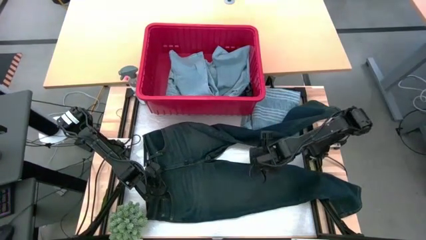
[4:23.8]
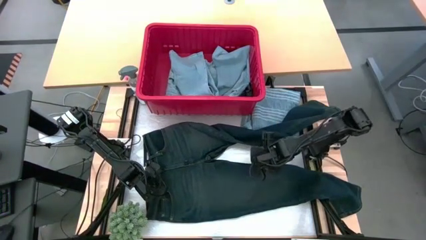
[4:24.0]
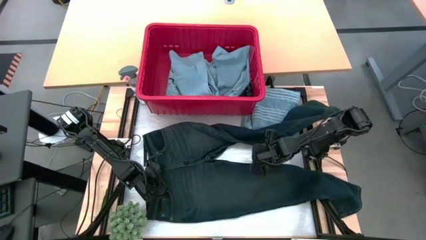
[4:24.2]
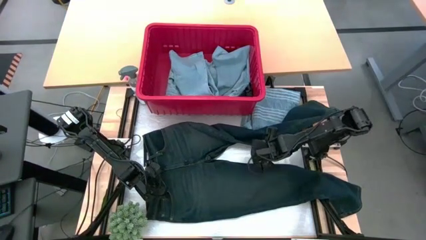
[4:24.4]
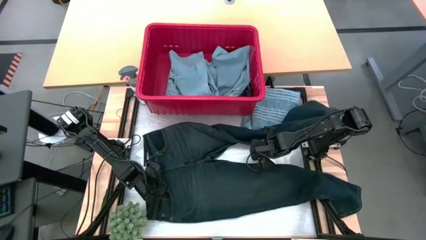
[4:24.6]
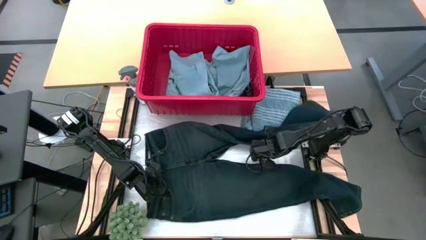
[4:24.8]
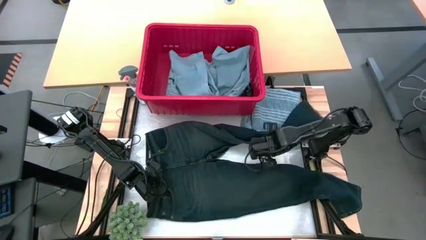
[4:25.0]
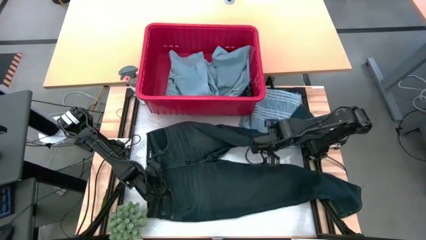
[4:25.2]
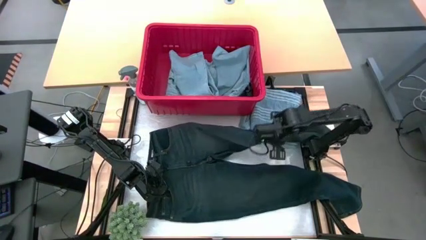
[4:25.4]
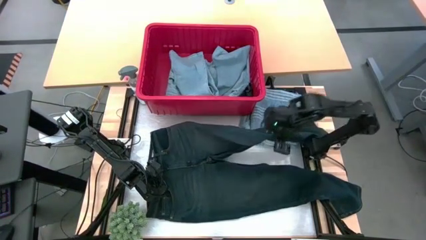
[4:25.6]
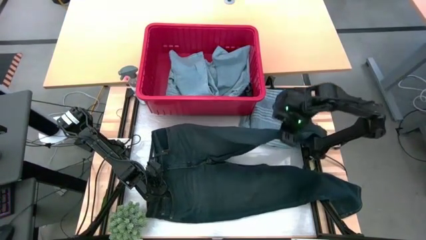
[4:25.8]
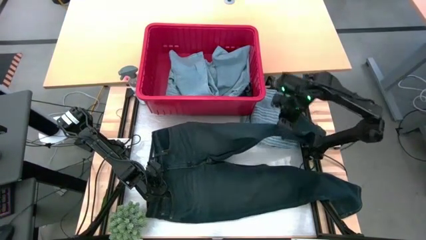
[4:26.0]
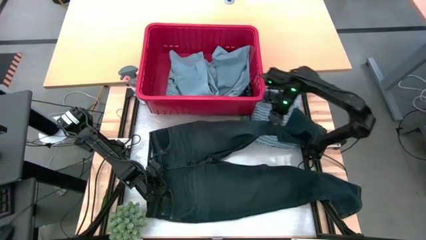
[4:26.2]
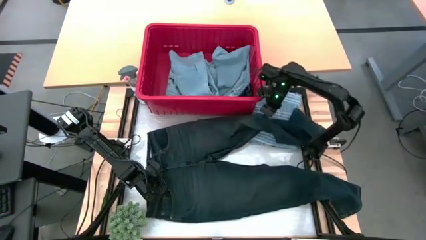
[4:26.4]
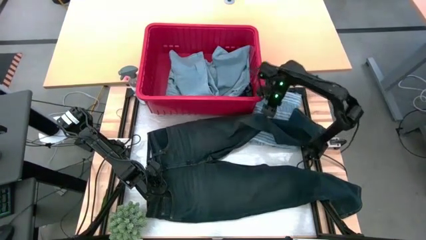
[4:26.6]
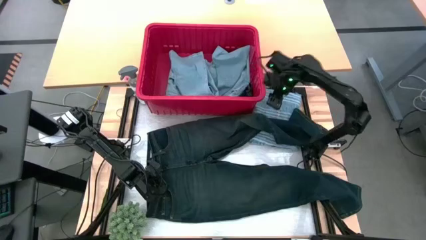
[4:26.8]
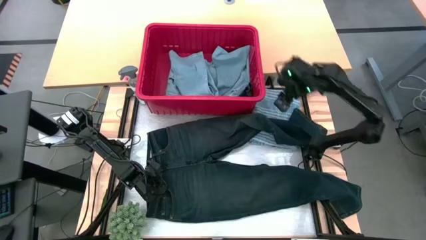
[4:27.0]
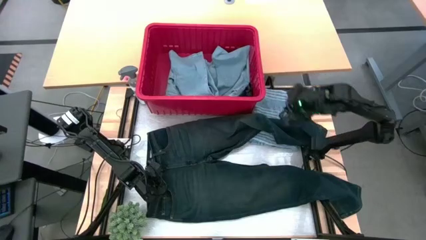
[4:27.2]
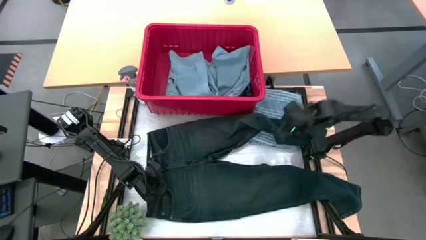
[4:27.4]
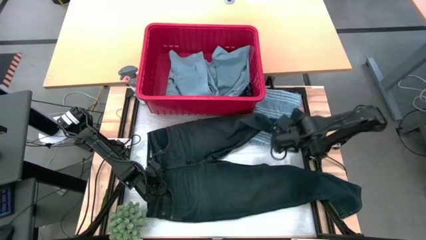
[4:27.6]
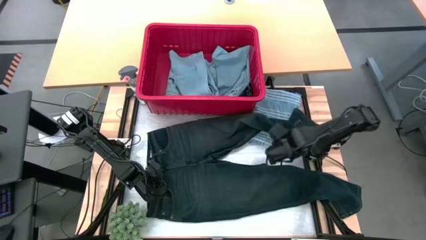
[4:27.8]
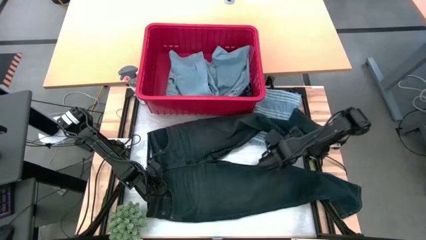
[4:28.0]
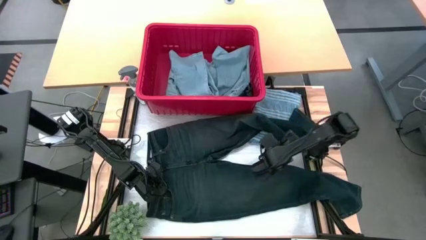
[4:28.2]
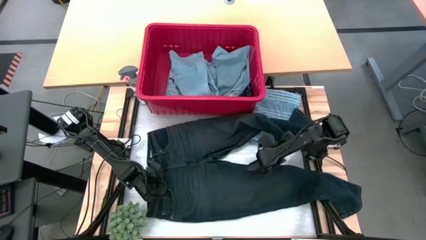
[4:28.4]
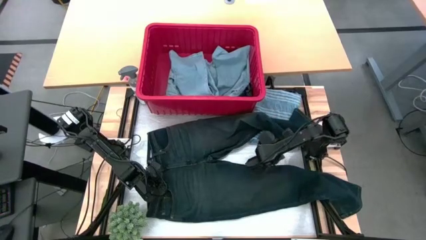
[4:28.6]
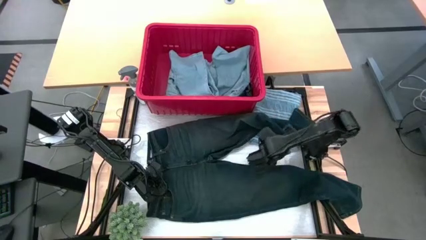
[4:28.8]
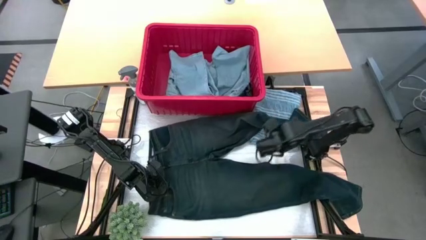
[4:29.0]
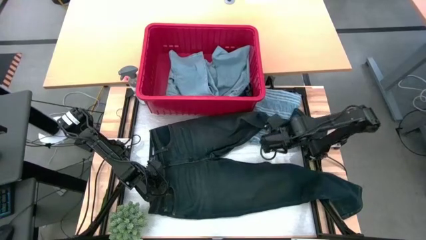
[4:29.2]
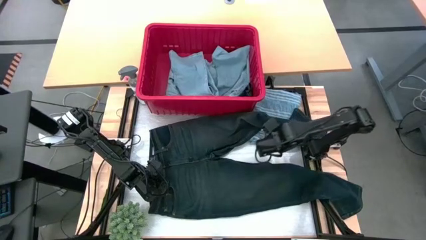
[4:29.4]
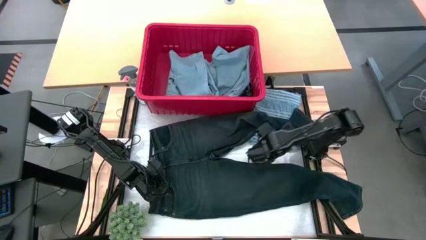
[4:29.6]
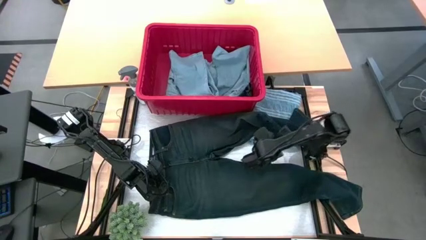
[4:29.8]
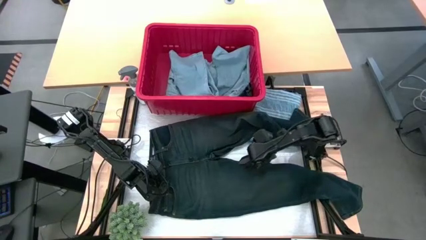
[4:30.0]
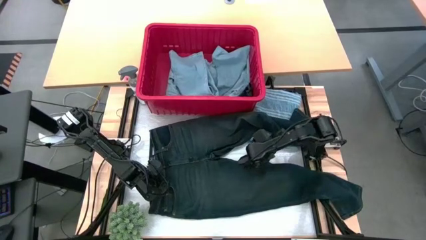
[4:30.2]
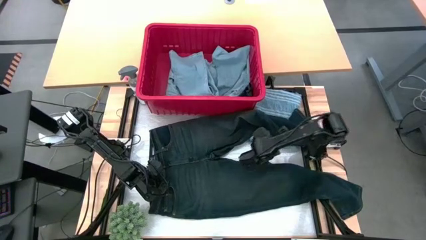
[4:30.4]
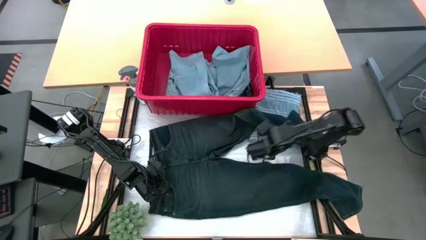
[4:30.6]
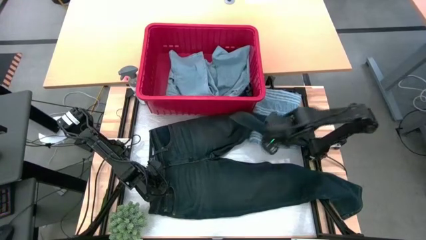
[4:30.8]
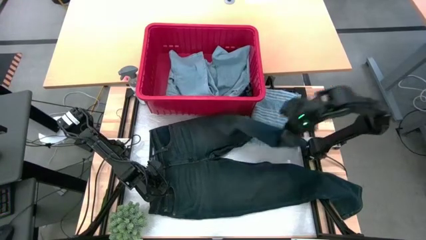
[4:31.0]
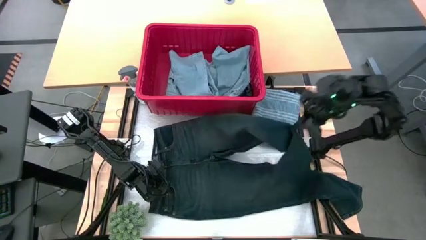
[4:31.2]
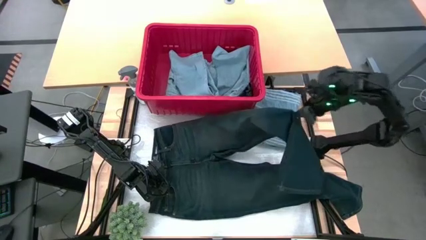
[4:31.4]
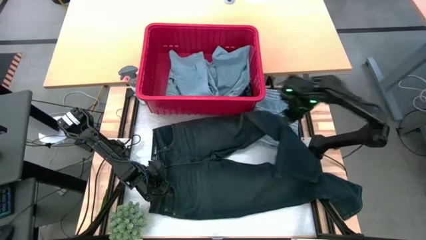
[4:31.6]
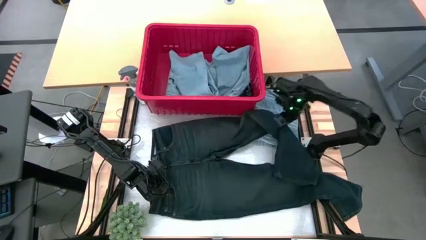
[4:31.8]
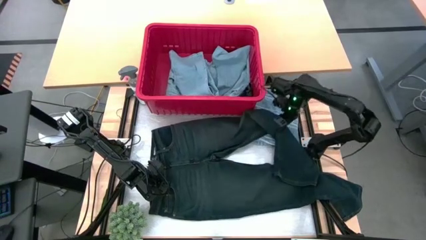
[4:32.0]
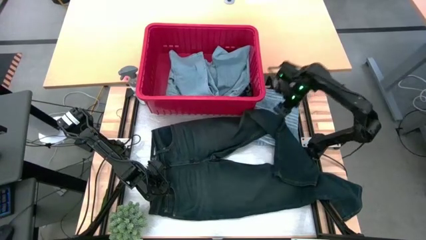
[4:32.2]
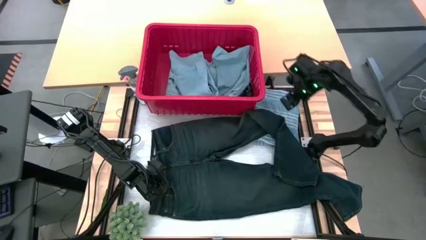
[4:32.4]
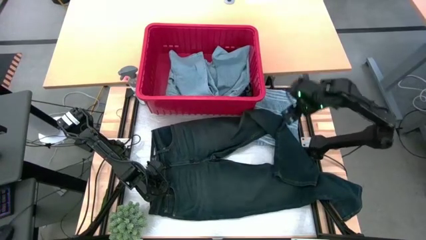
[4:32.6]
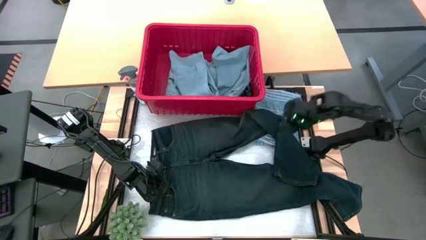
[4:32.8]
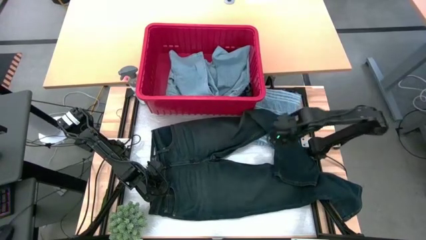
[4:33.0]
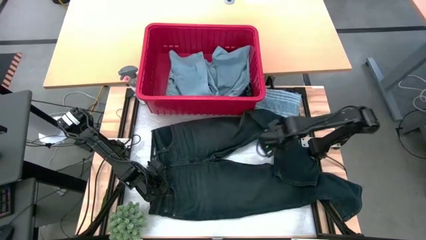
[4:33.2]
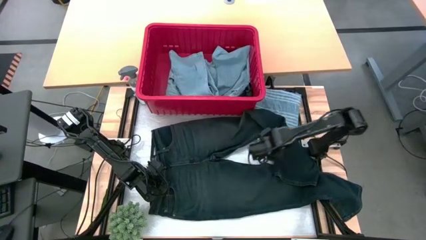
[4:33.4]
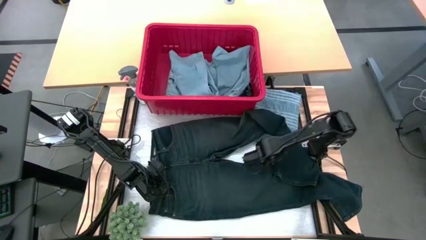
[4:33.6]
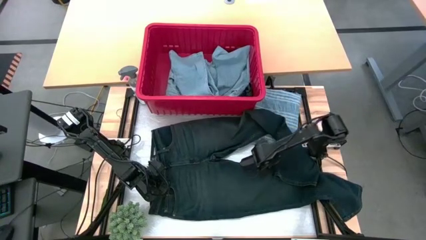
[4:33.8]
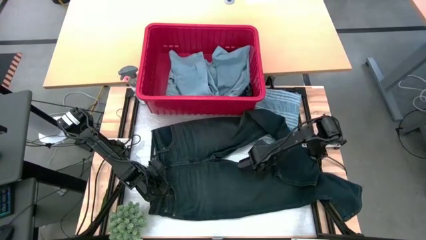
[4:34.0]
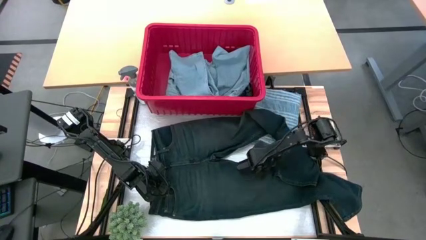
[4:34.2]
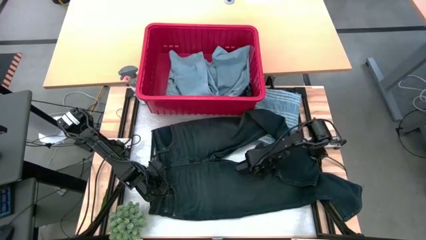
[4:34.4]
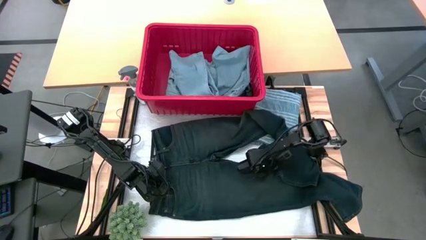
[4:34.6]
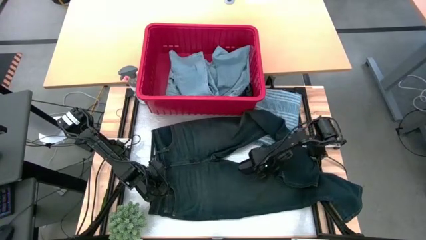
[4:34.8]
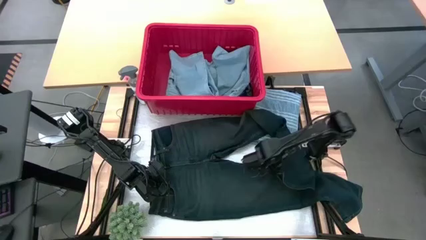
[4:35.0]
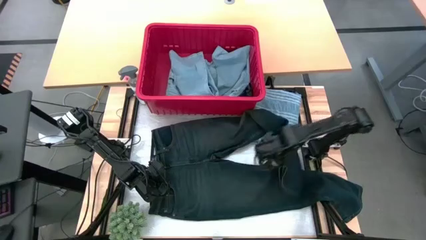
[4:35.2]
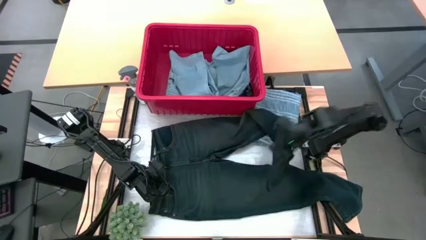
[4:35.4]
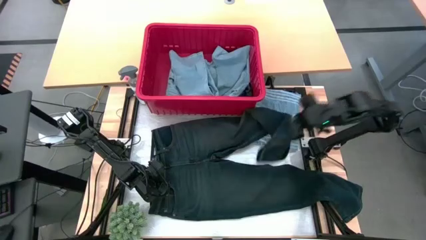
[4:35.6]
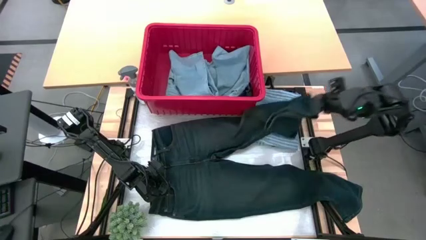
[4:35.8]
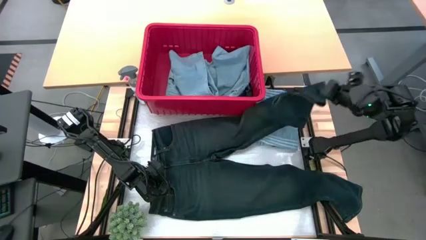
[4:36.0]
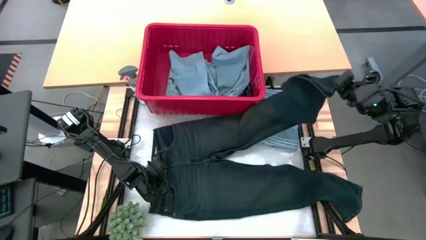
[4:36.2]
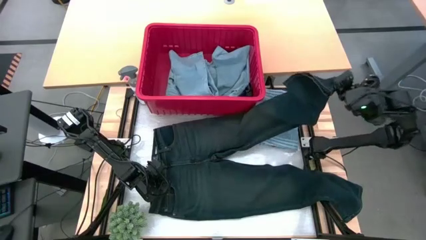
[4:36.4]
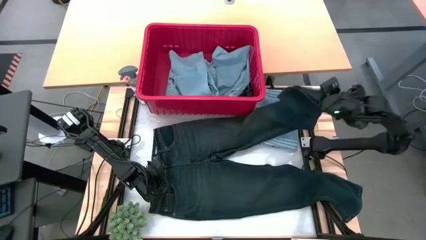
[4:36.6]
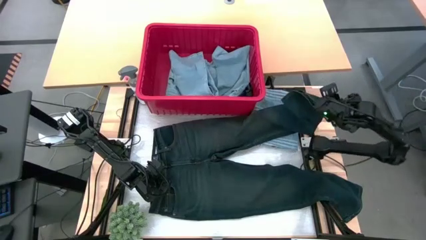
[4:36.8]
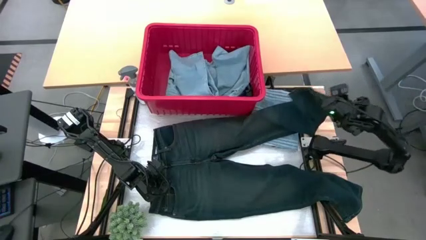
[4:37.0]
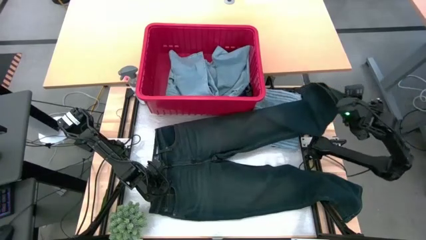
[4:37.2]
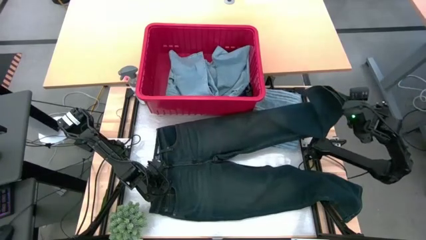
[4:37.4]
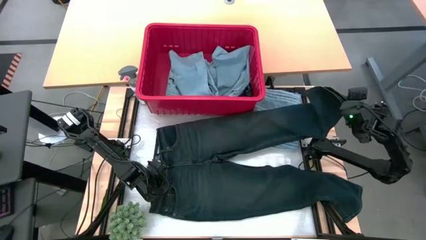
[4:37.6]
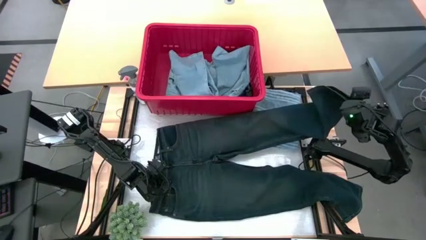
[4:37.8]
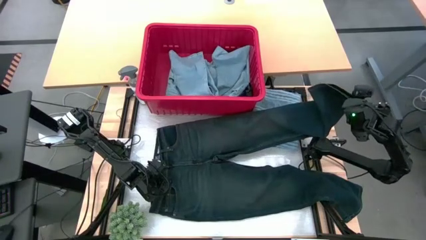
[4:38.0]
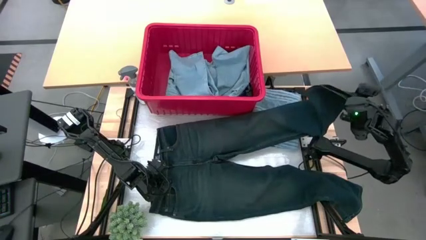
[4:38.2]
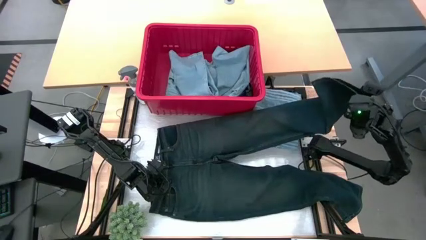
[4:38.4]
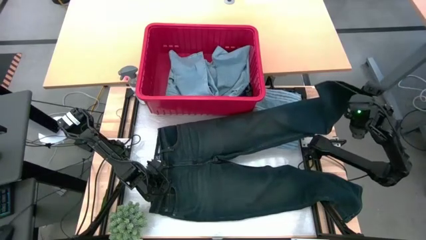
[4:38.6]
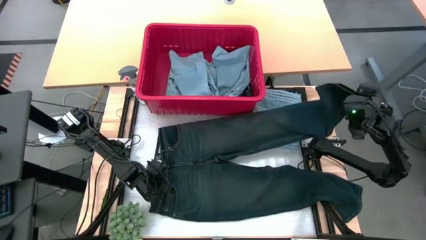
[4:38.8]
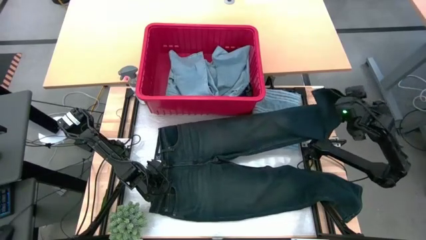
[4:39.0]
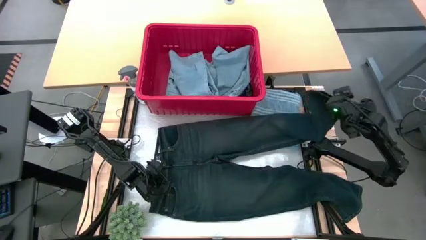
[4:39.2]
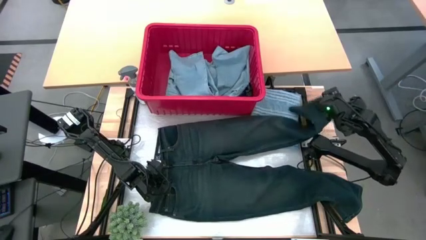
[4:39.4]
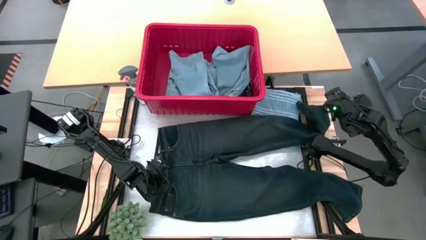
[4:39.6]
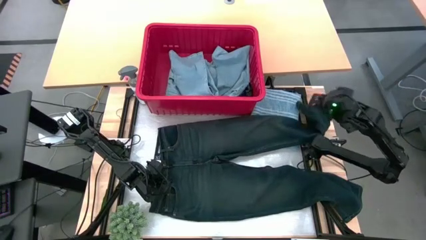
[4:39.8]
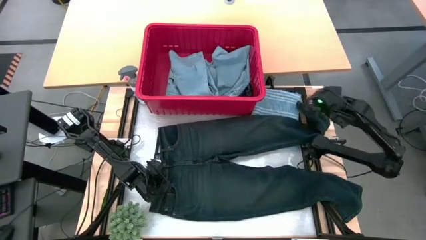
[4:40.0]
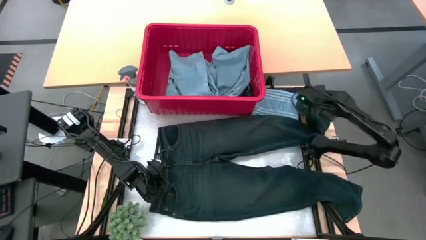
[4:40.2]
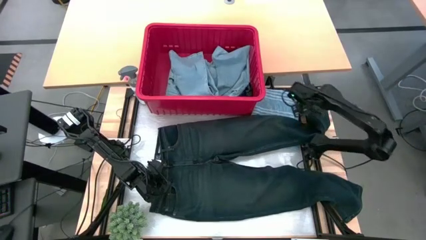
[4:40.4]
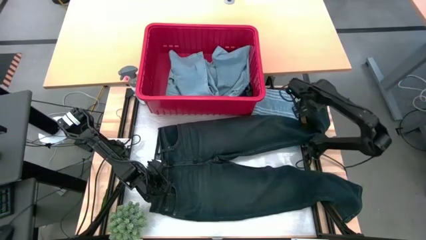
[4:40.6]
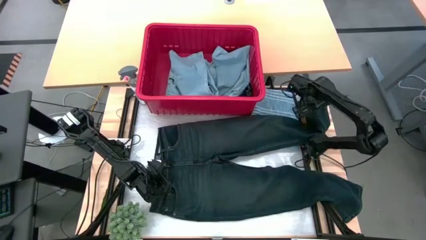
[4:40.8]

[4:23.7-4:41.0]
Task: Fold Laundry from Bin
Fold the black pants
